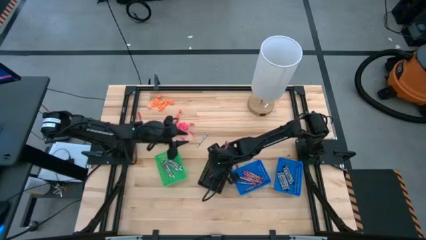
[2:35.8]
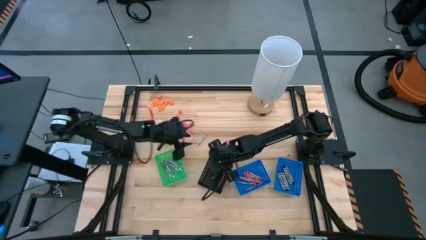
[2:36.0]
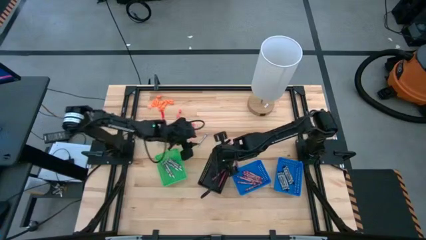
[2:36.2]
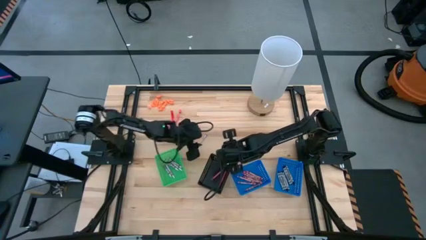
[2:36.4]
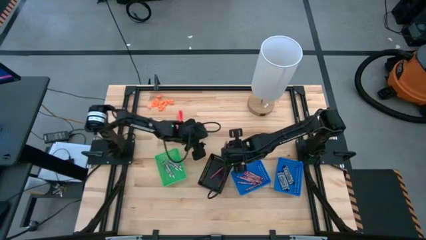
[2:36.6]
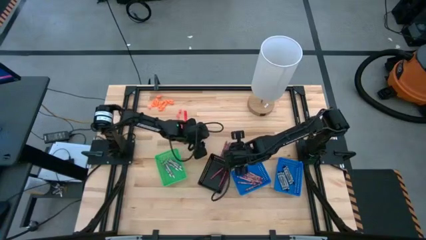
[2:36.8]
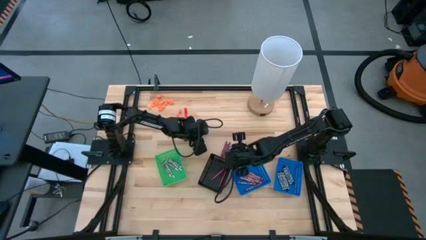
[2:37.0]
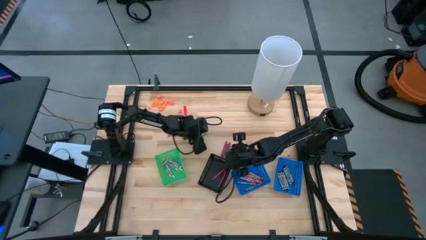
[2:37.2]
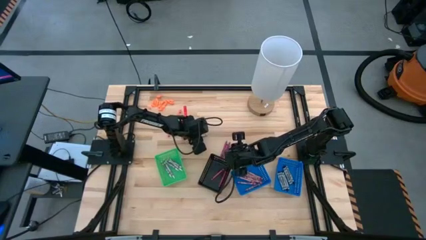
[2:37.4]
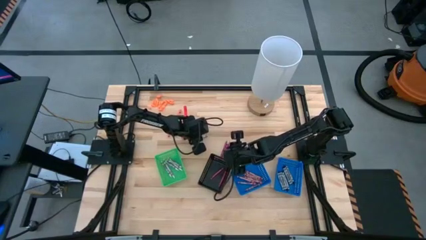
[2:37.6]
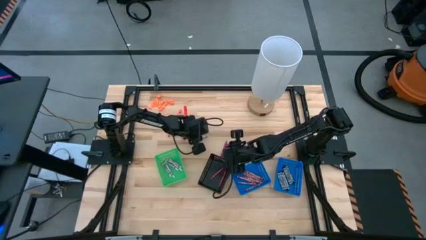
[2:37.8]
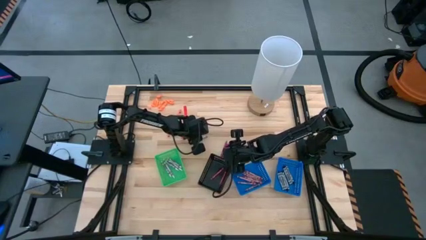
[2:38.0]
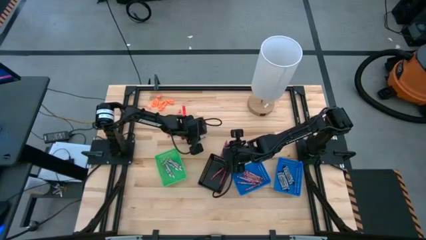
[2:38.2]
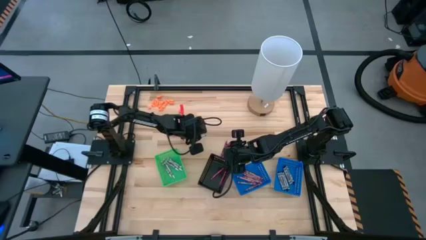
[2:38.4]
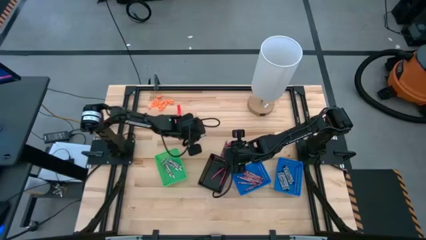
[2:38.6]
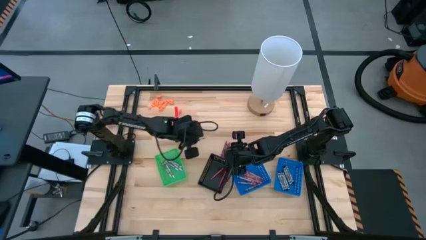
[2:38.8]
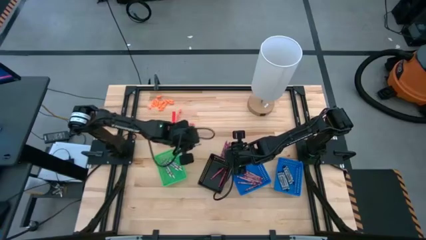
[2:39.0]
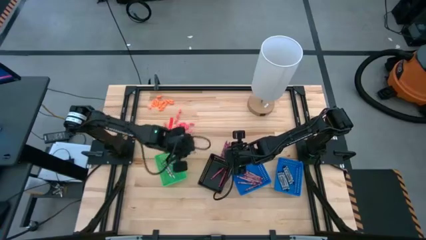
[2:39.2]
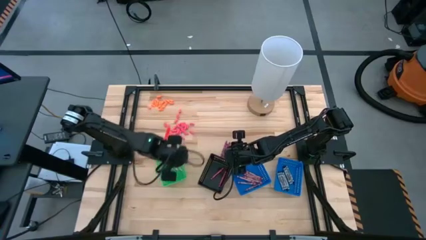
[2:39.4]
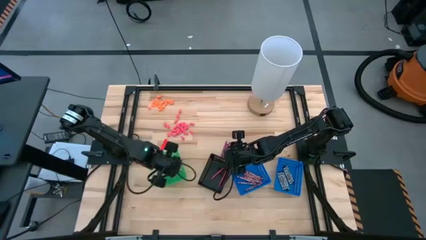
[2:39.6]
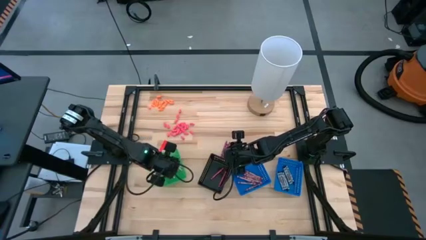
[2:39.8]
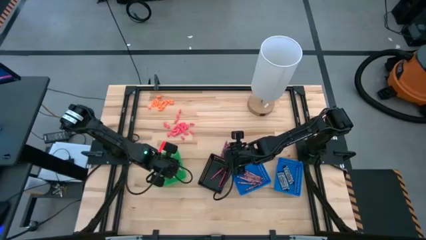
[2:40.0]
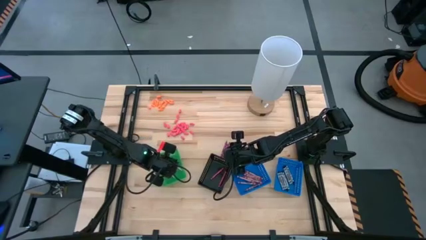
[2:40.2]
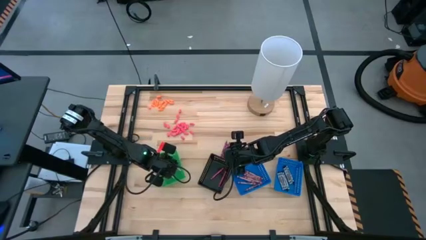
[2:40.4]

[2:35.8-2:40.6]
Task: Sort crayons
Put the white crayon into the green bin

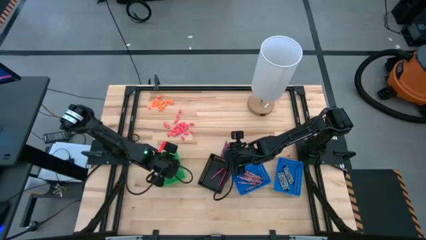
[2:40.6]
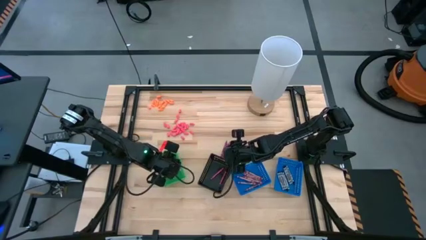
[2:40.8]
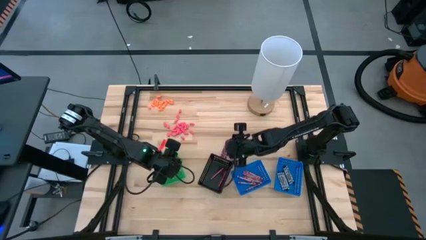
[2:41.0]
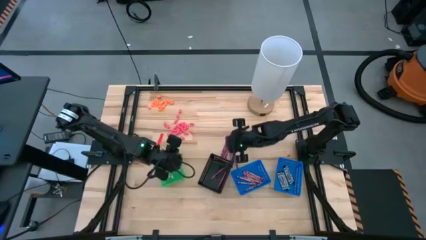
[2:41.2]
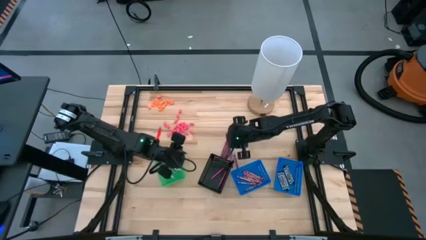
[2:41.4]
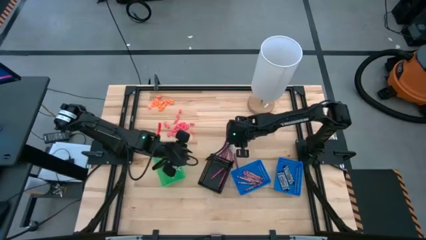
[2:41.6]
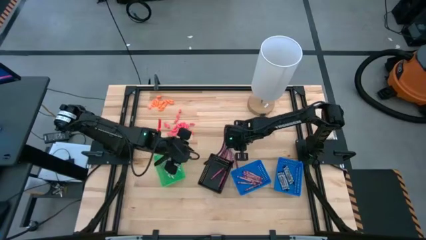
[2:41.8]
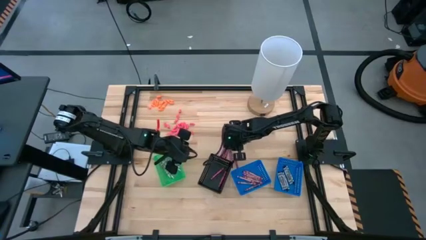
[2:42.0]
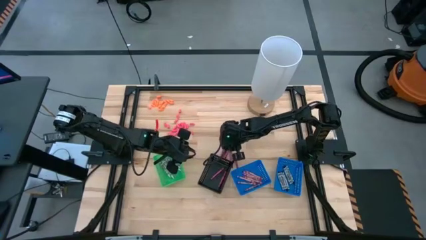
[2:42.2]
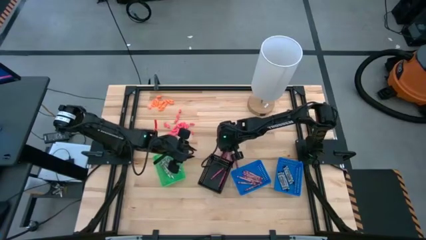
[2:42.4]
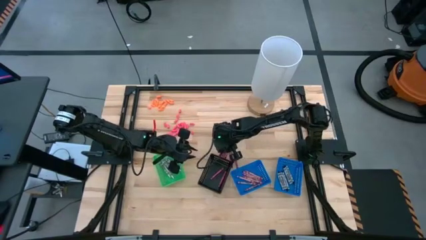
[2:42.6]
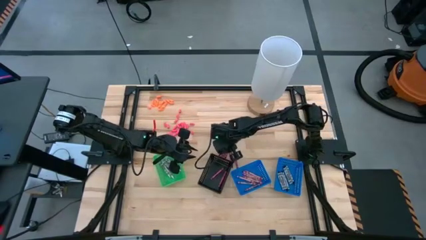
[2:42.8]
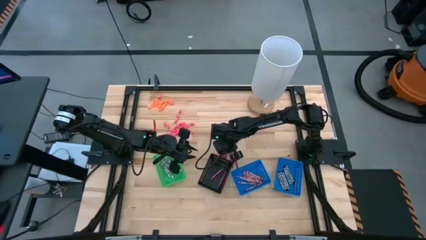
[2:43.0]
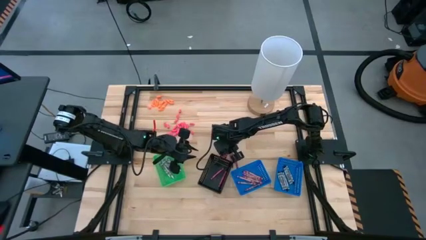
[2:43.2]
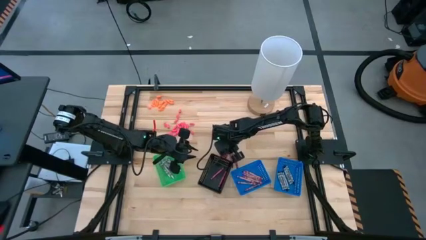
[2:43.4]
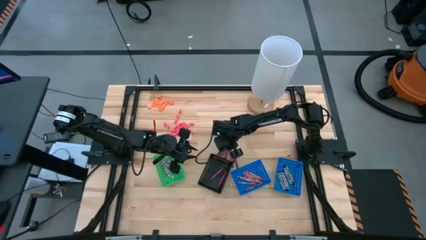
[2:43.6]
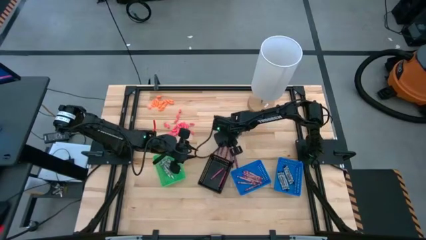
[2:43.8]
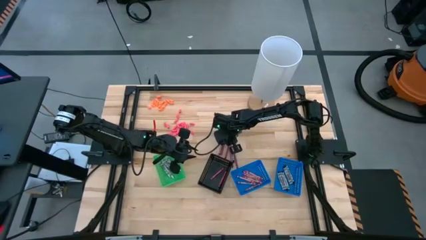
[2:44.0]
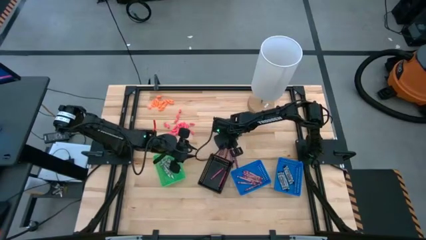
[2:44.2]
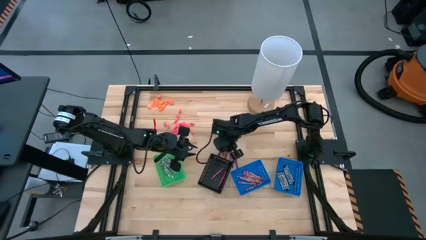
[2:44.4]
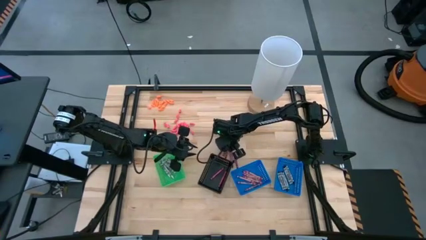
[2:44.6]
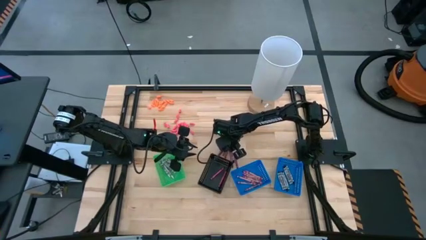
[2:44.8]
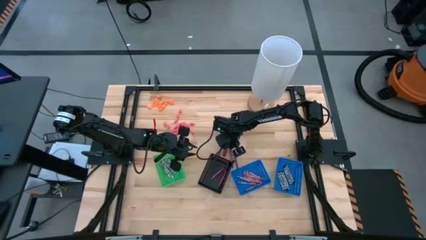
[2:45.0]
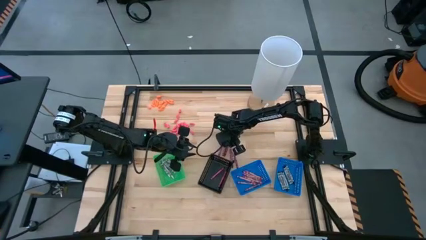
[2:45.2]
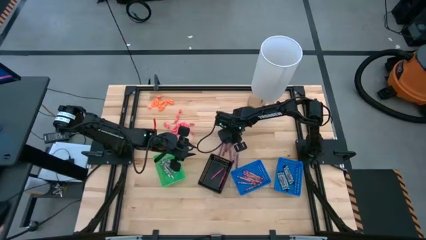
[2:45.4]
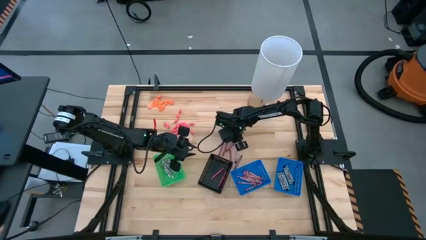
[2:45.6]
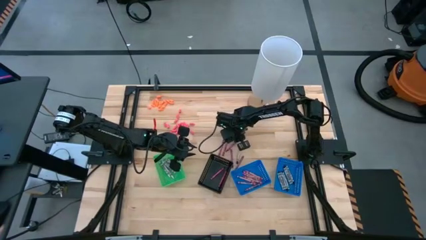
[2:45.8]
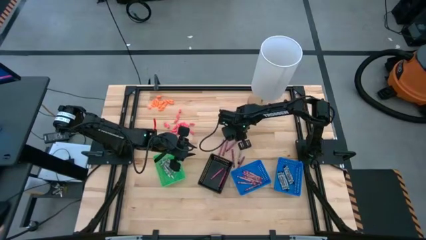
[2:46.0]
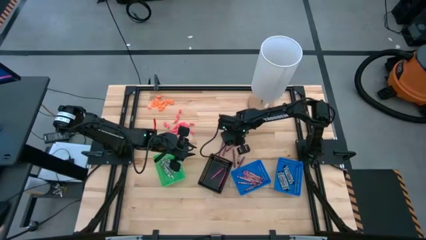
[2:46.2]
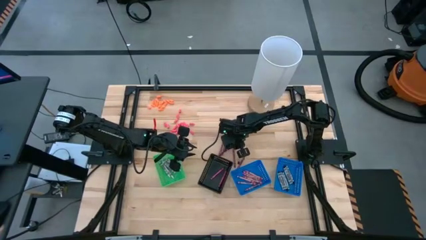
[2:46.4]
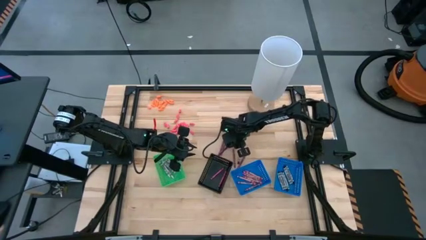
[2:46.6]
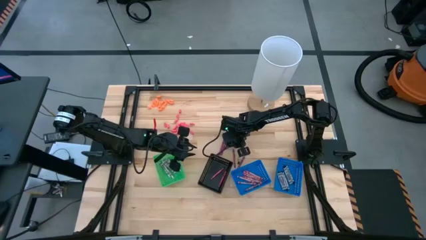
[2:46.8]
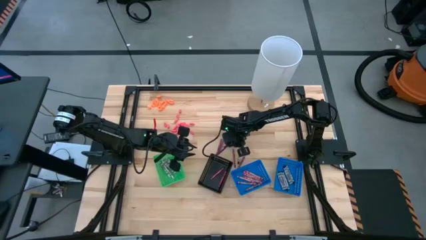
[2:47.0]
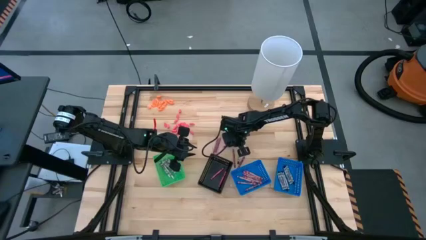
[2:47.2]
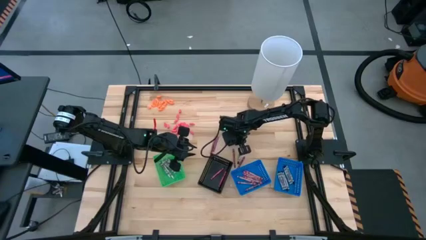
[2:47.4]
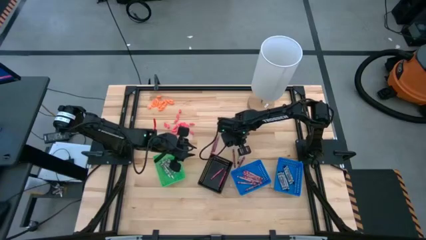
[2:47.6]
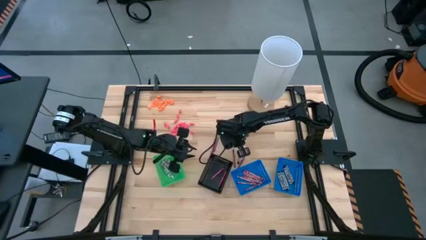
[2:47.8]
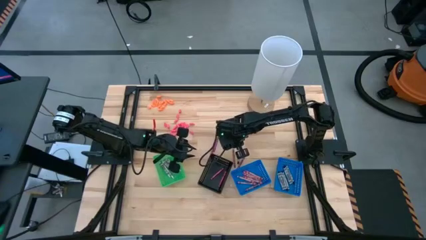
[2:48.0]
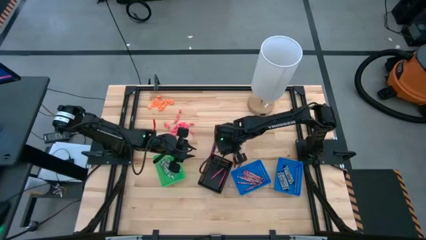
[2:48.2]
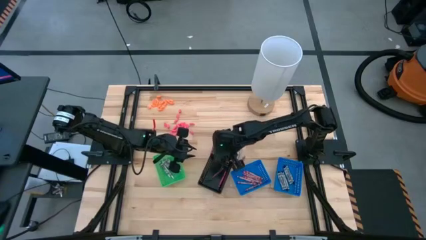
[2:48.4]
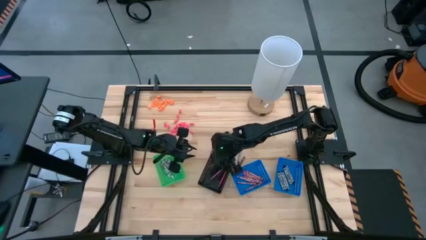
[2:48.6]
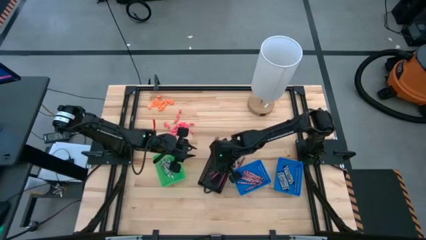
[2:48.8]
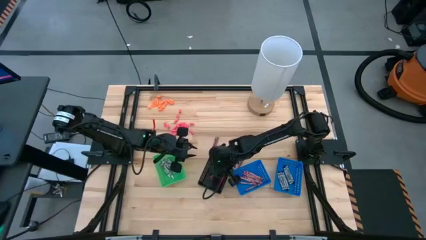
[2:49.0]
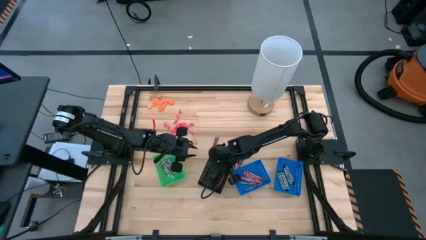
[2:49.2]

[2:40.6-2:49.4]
Put the red crayon into the black bin

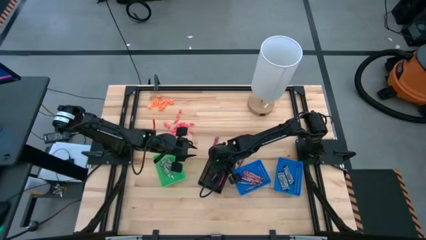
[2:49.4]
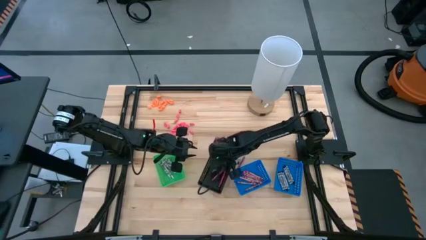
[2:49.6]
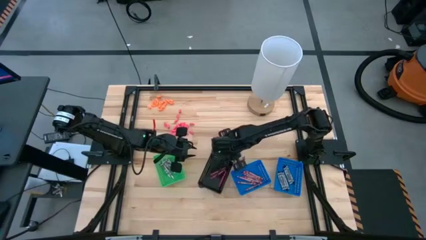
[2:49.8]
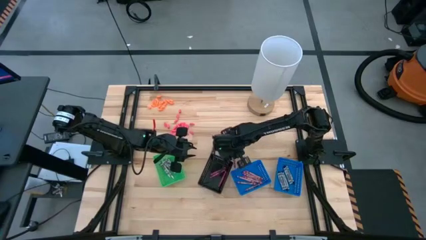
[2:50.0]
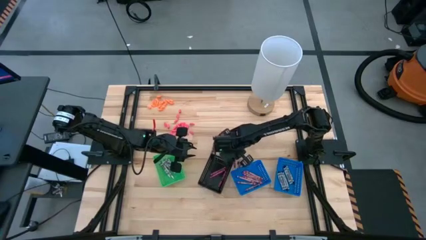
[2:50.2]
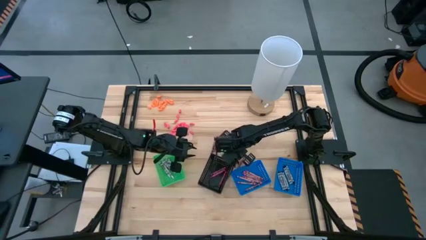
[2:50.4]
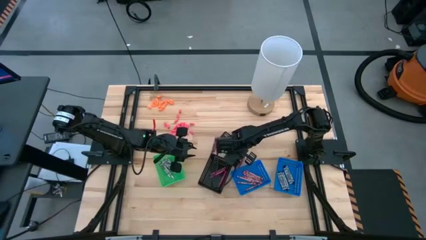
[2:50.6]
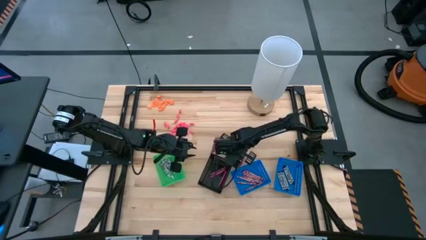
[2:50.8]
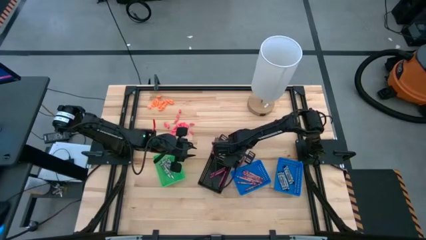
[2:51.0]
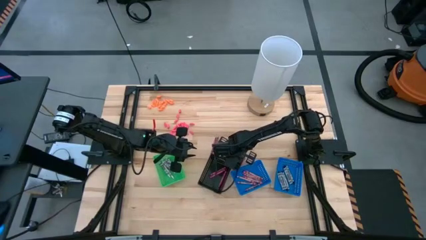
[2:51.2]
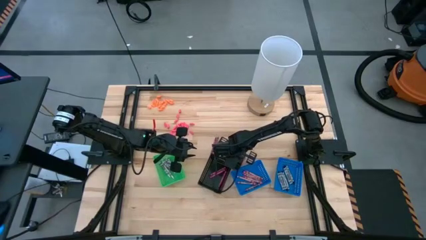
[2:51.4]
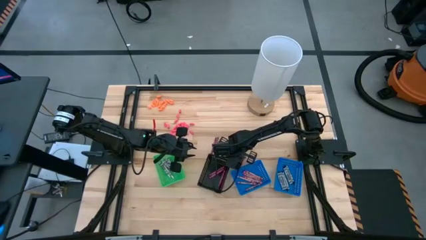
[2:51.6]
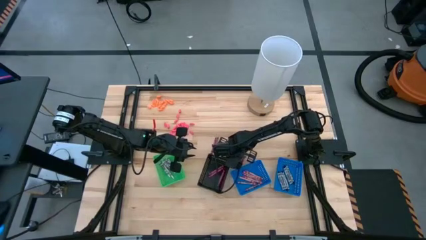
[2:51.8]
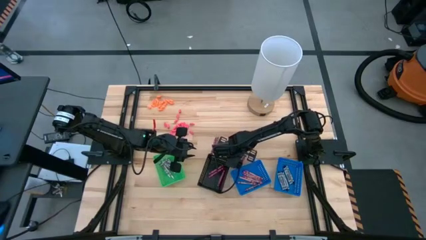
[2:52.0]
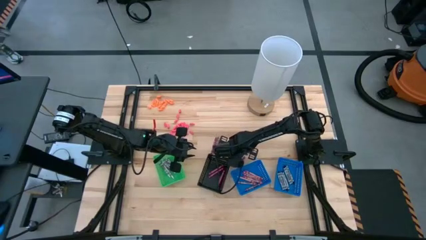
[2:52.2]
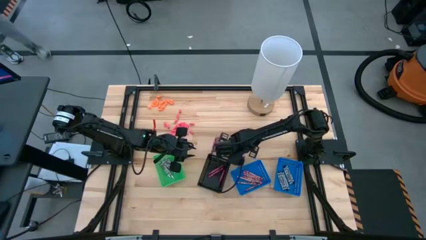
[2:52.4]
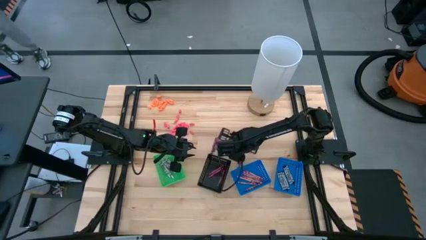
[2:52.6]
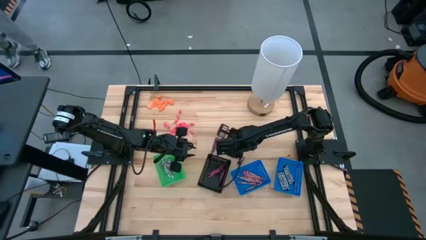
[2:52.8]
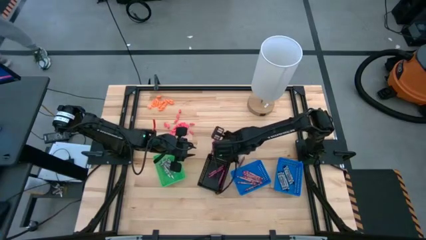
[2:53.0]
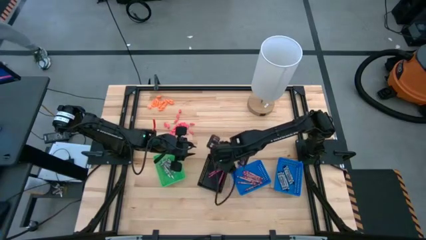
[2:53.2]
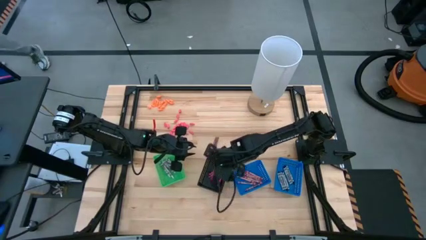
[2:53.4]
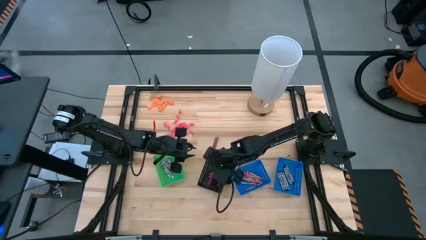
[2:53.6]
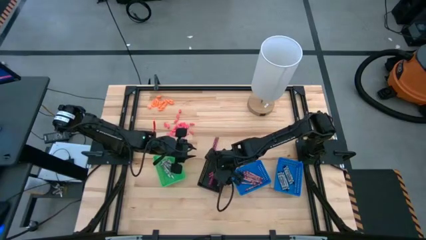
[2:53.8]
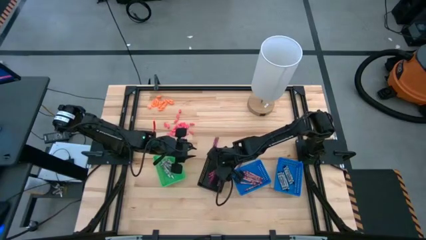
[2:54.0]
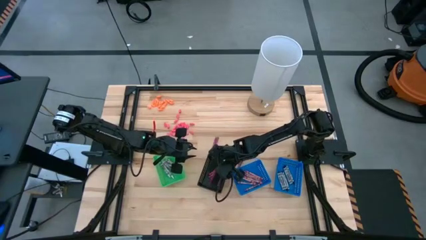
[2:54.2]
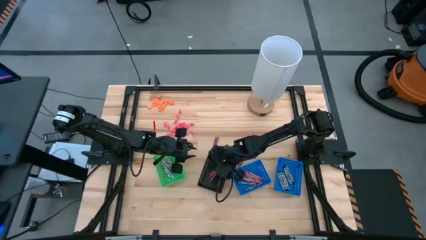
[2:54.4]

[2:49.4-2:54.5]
Put the red crayon into the black bin
